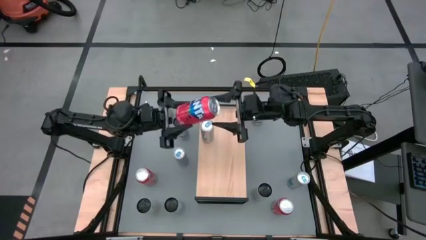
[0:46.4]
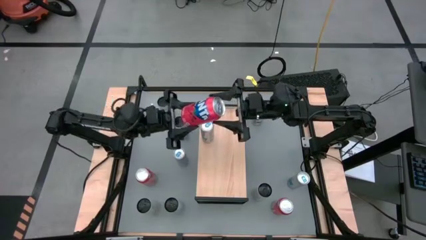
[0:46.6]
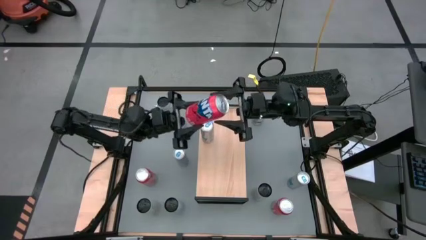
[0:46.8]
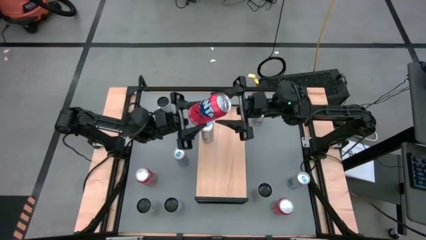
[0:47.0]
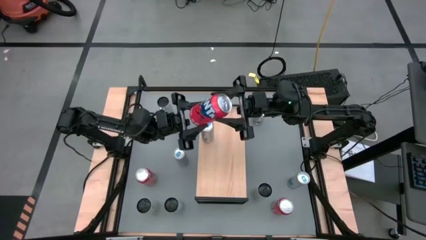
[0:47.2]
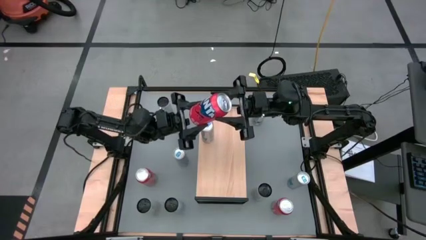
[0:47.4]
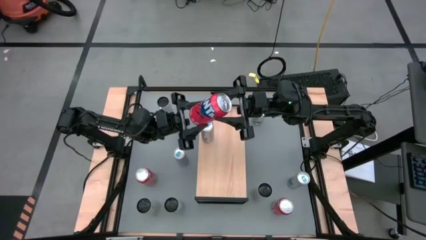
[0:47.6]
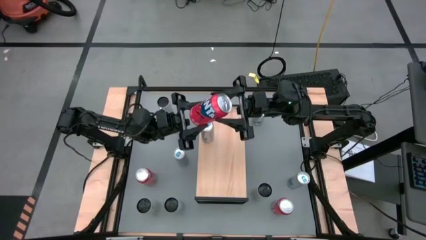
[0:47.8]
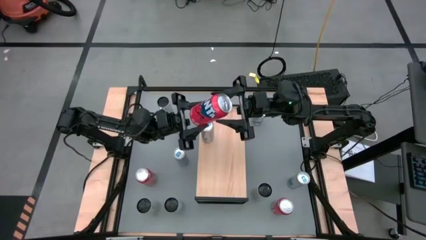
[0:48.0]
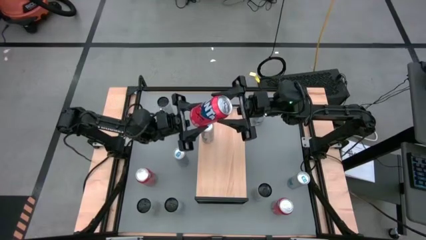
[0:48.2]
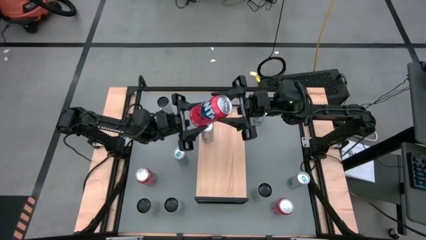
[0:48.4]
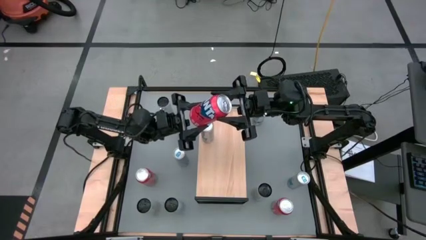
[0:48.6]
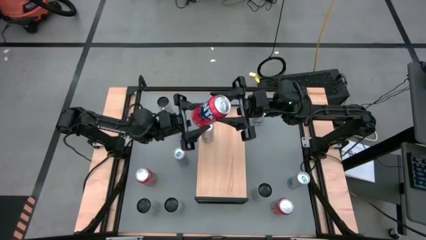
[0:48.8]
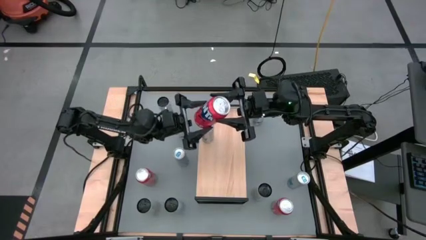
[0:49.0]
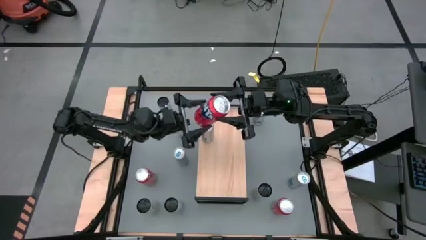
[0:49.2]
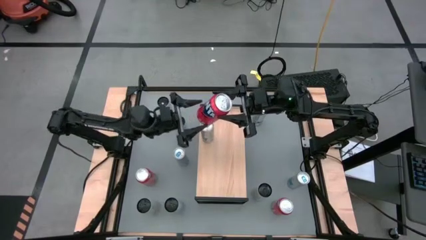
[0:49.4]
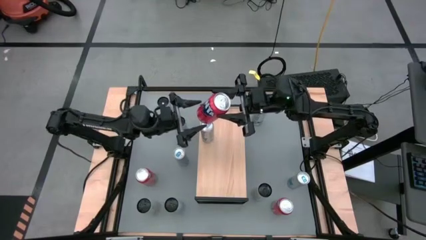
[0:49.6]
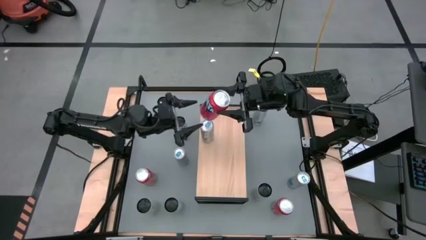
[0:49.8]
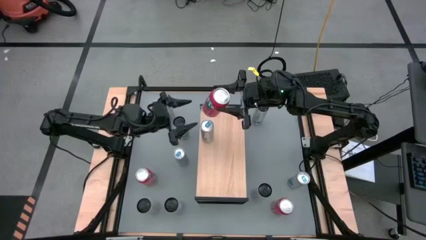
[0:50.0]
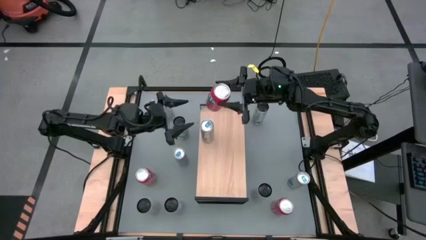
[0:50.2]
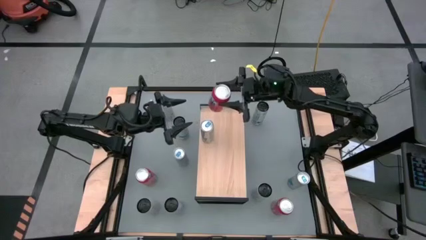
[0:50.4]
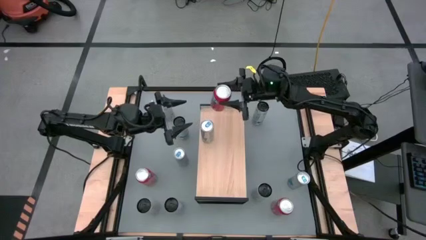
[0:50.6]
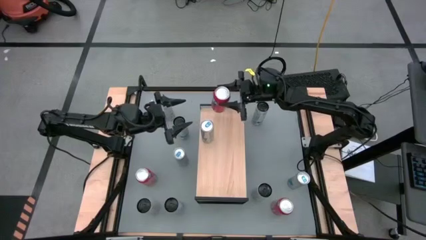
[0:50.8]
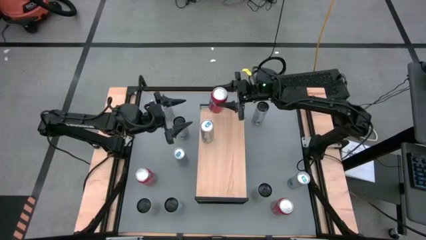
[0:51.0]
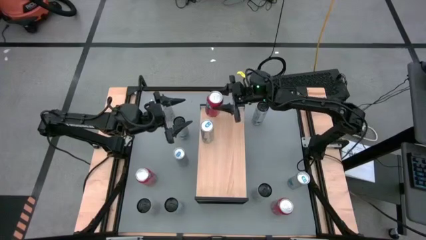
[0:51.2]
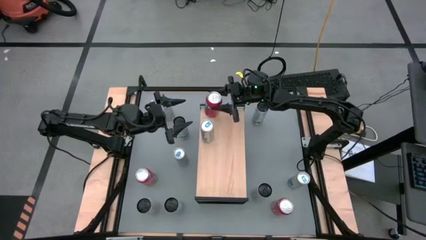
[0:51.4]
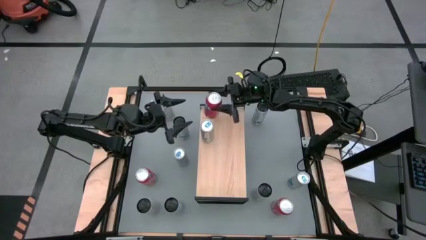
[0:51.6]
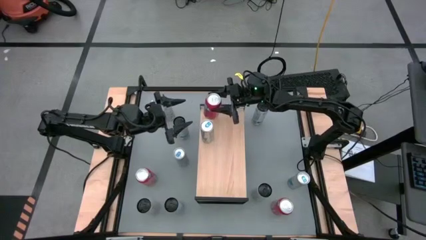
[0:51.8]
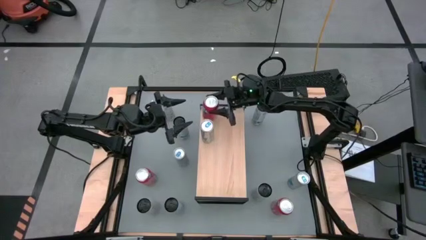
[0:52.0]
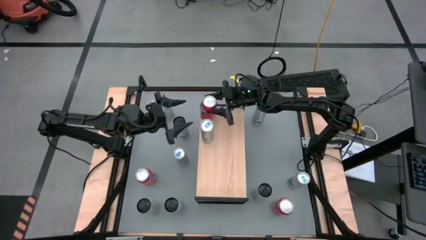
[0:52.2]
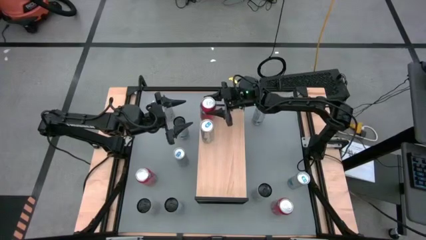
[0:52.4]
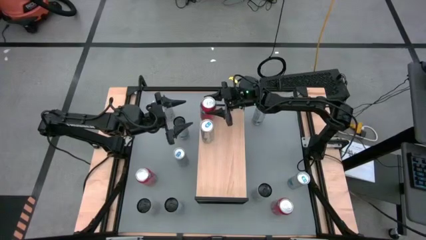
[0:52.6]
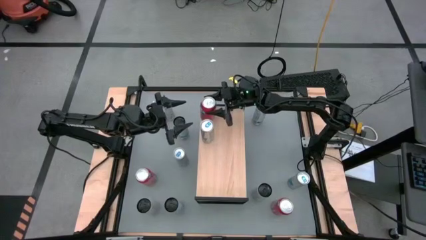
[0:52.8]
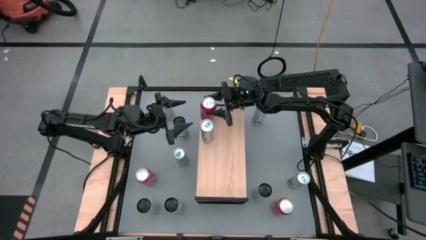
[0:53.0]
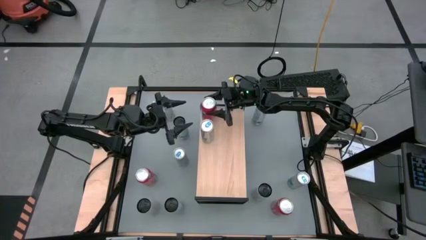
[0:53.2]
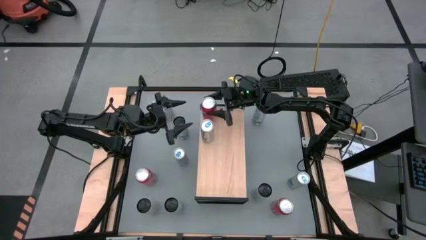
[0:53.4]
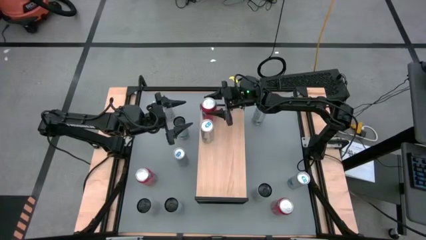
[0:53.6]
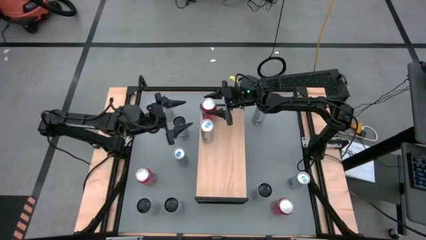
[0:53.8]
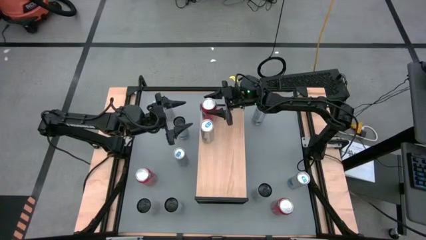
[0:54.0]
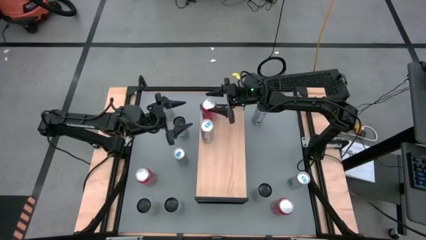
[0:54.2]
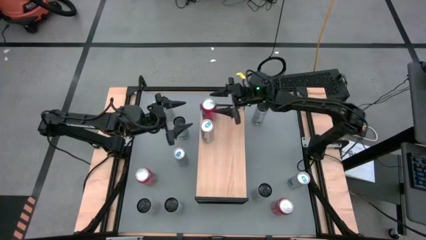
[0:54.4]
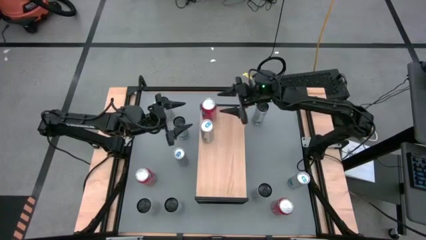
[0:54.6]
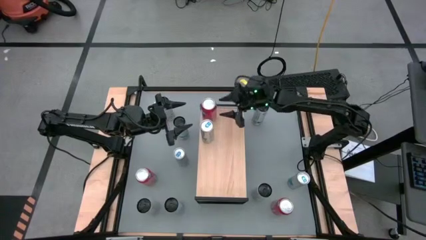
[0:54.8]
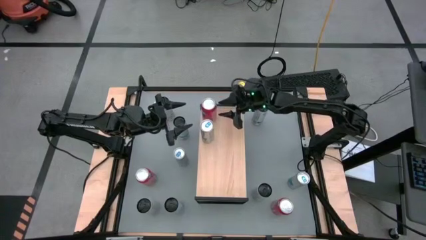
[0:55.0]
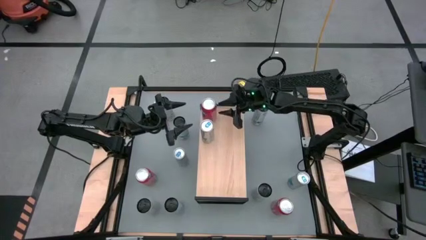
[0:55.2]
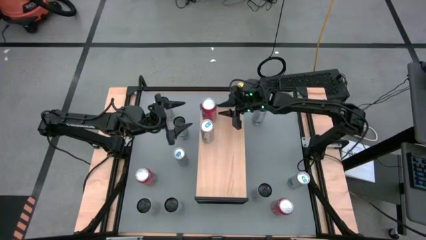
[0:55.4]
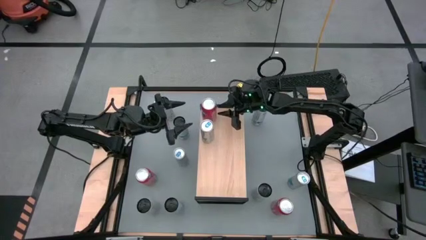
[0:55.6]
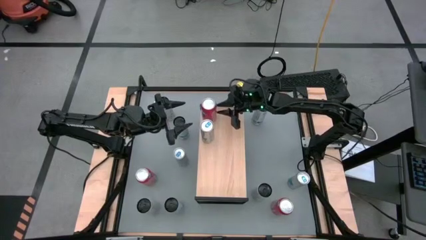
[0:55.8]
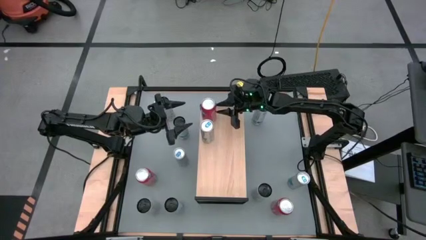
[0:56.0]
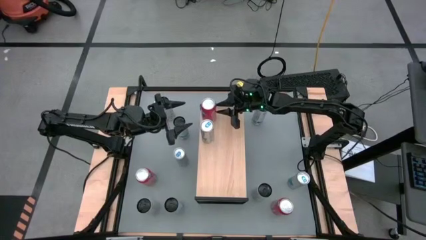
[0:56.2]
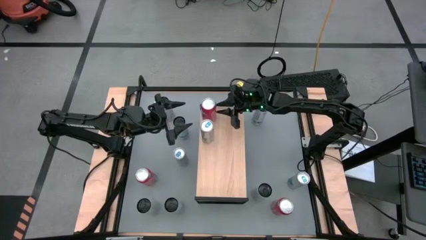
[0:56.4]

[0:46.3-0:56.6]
Task: Place canned beverage on shelf
Put the top right orange soda can on the shelf aligned with the other blue soda can
